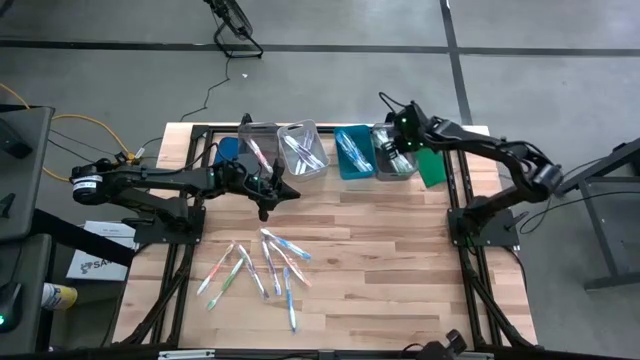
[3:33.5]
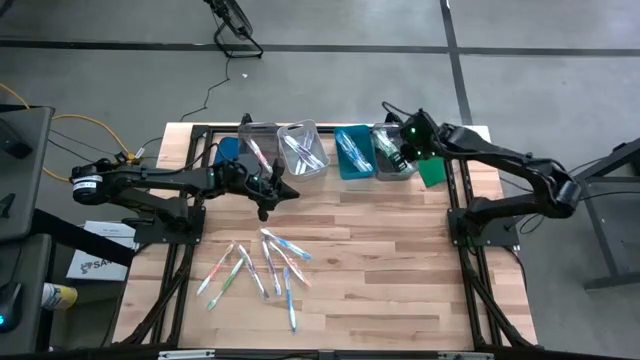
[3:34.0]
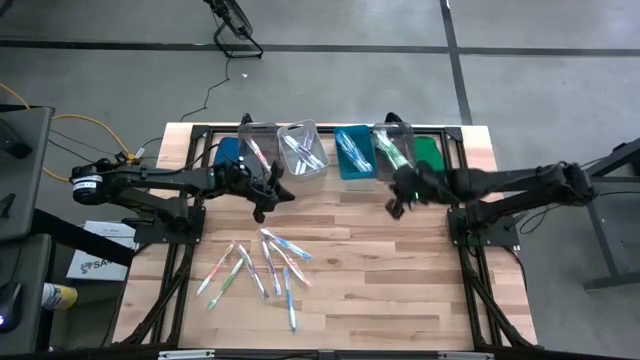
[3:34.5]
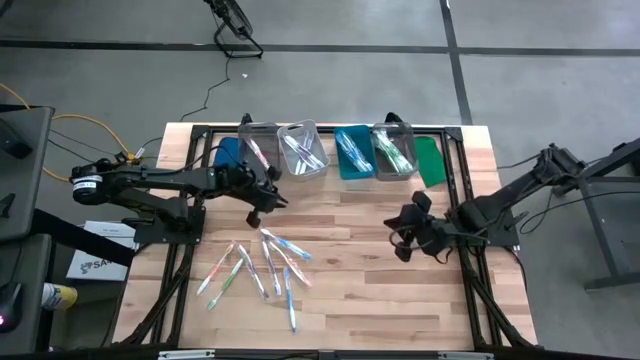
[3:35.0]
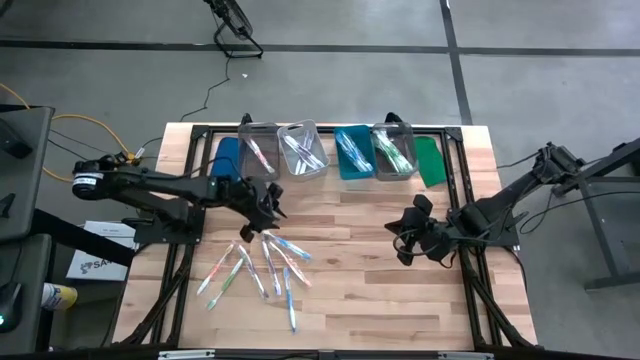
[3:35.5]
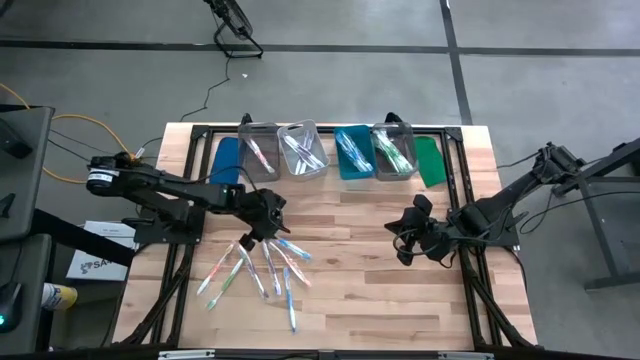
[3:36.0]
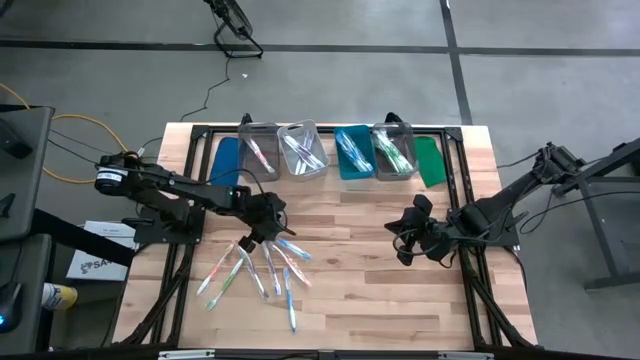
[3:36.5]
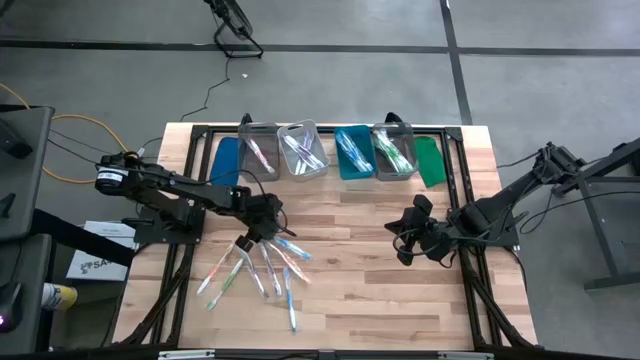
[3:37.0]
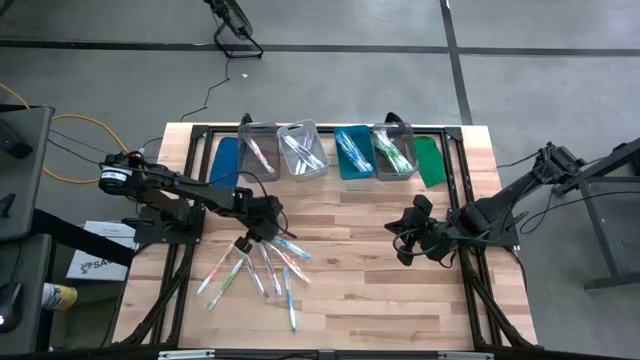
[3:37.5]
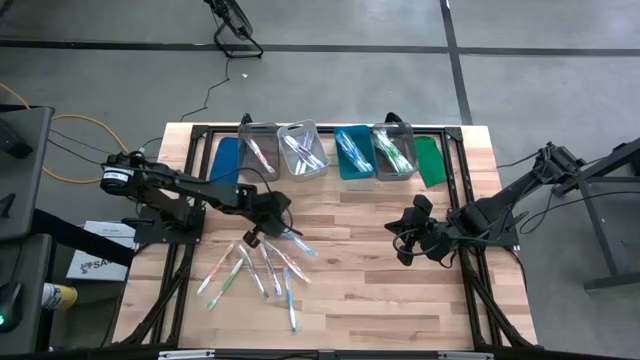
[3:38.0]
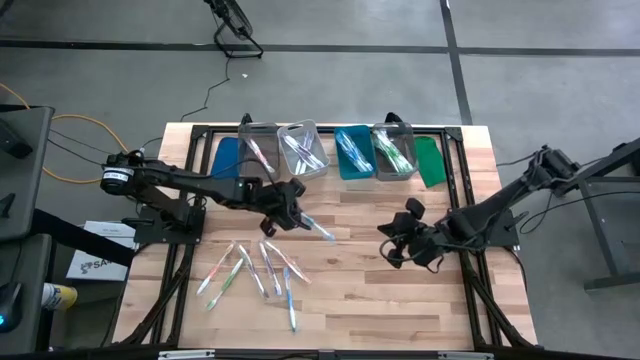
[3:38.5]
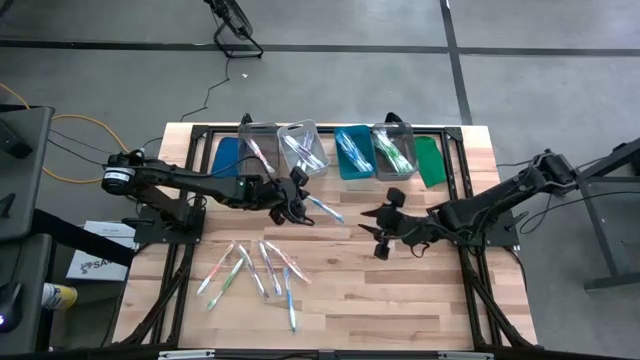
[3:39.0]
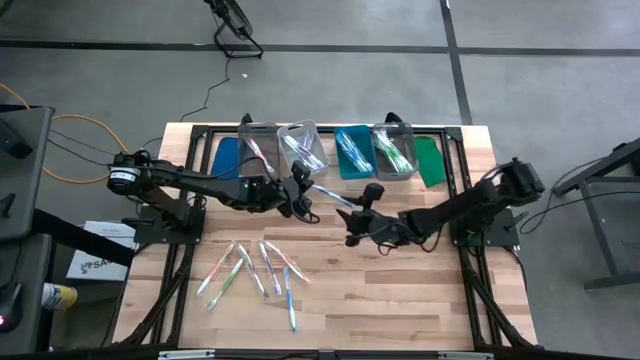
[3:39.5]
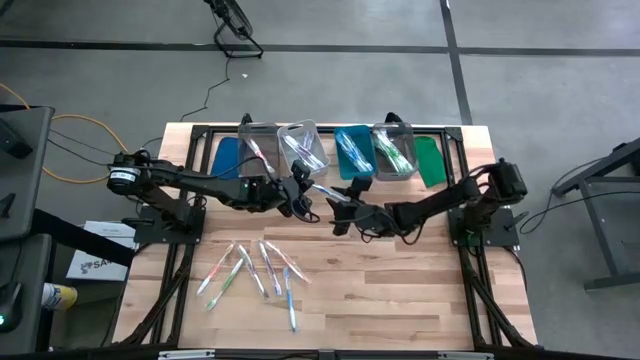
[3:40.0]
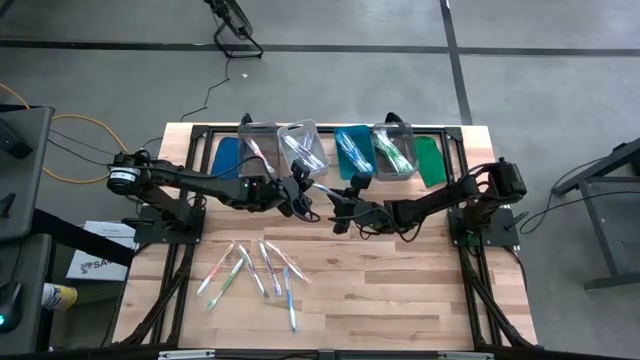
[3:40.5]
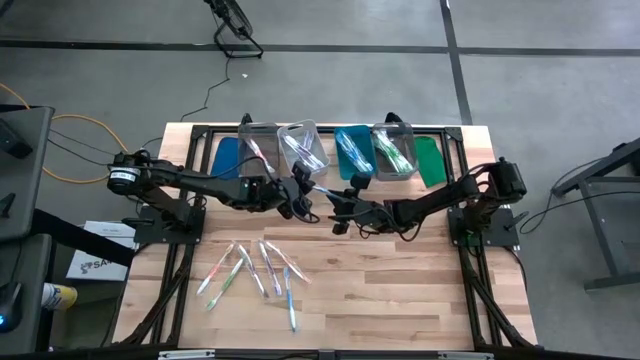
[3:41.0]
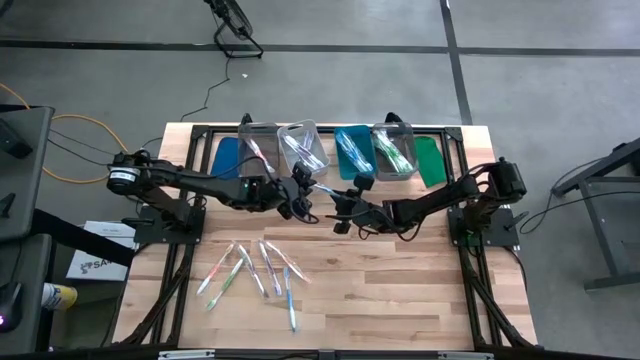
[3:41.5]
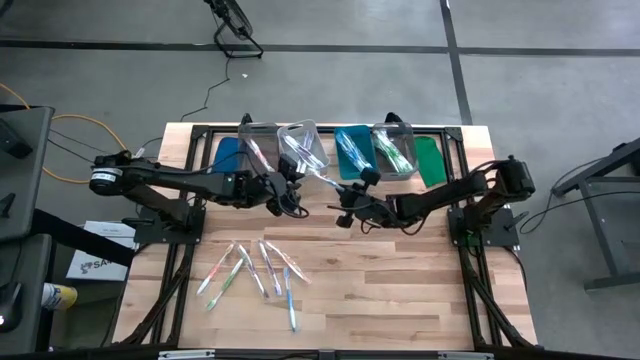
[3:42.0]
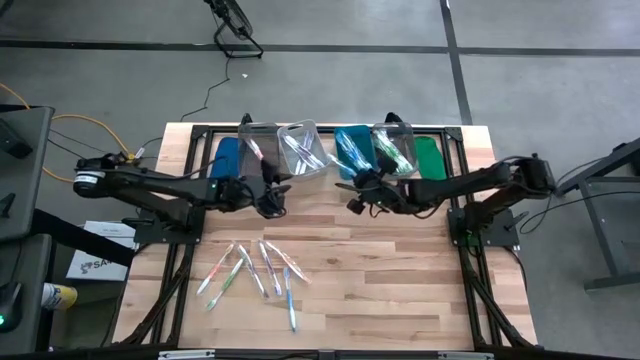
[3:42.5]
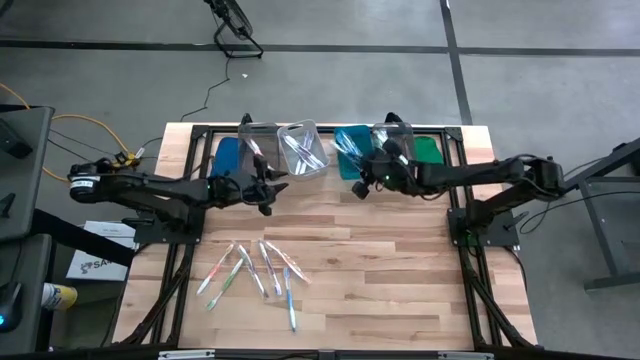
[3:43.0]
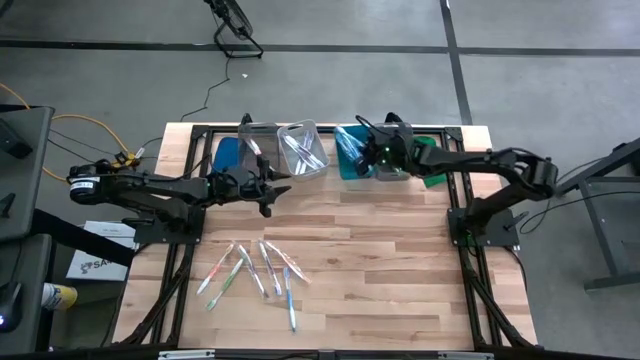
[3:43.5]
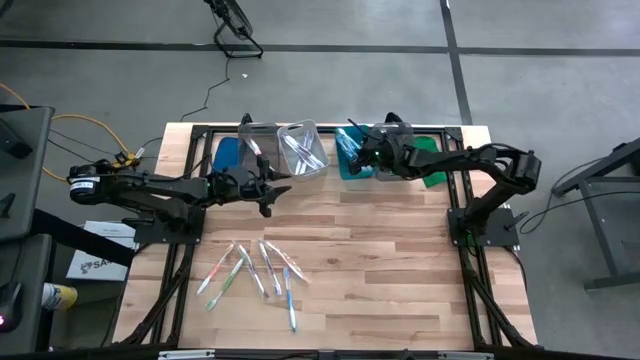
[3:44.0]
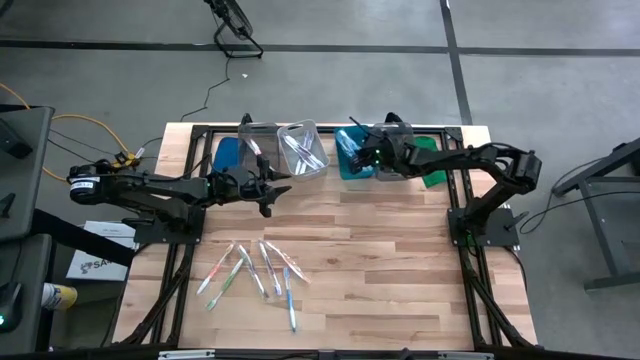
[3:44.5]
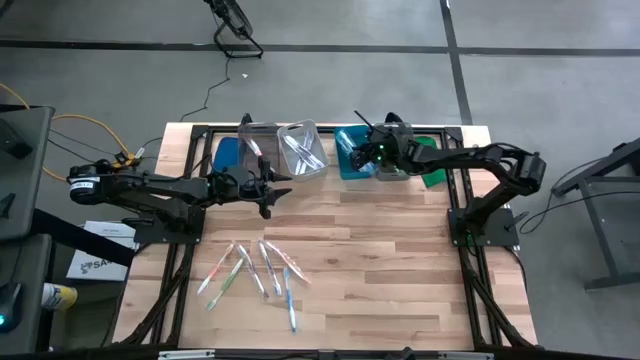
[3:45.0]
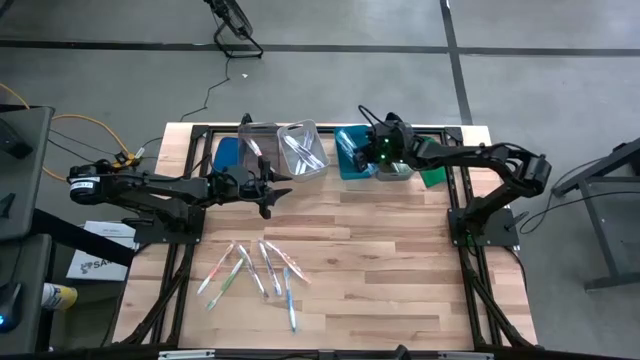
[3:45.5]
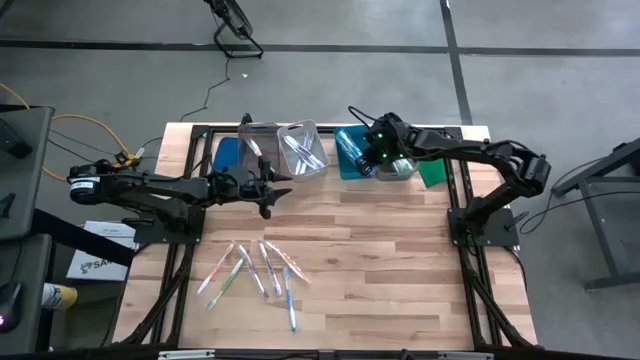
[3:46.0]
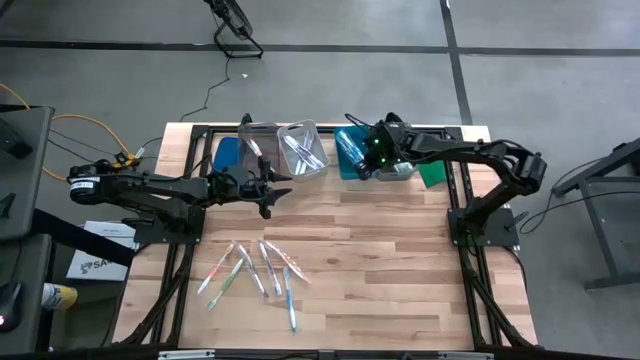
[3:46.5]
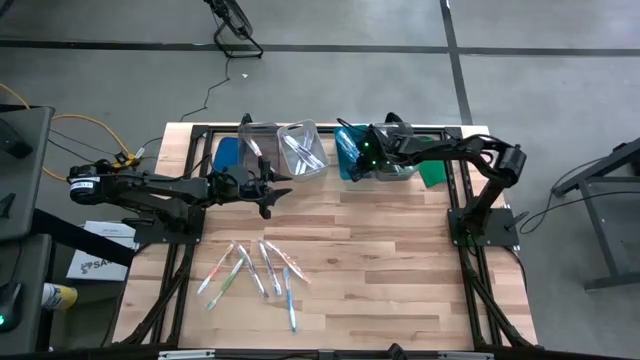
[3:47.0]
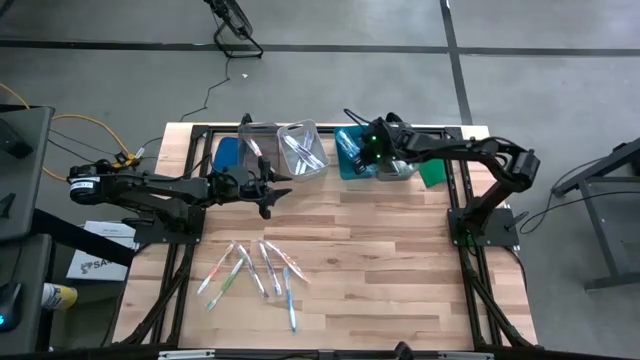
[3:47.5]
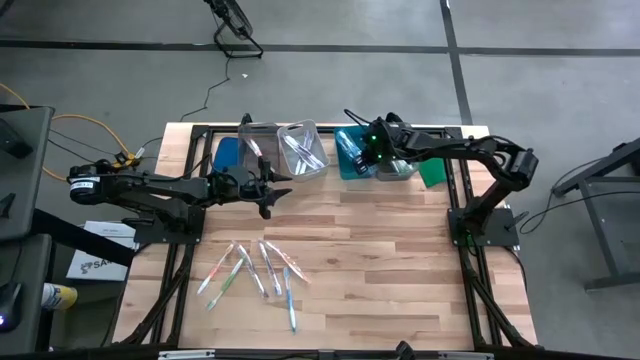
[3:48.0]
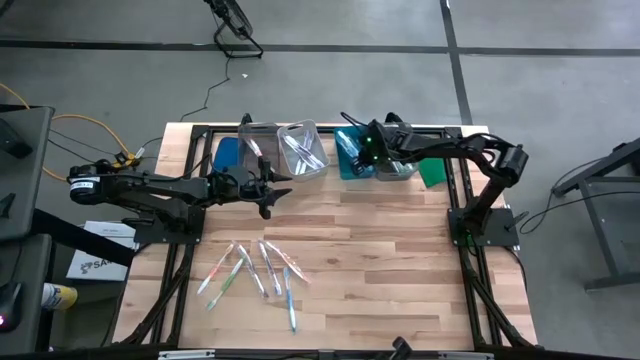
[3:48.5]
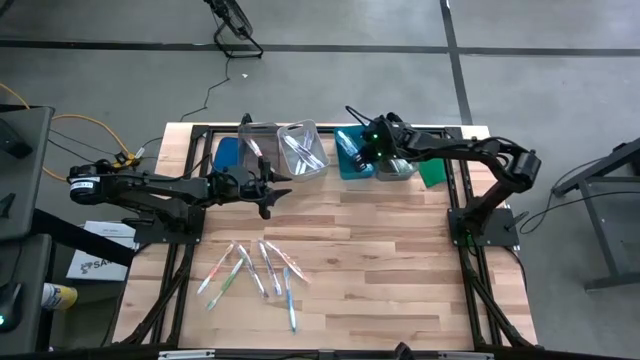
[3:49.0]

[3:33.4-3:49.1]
Task: Pick & Place Toothbrushes
Put the blue toothbrush into the blue bin

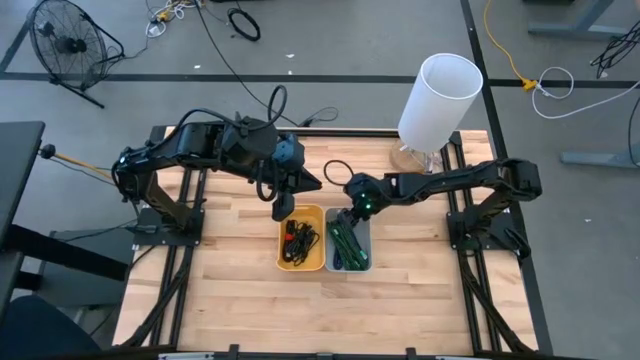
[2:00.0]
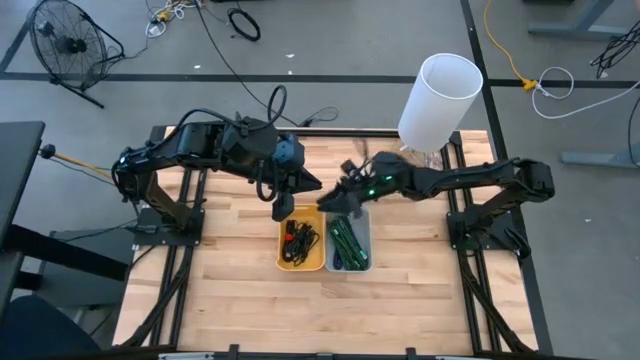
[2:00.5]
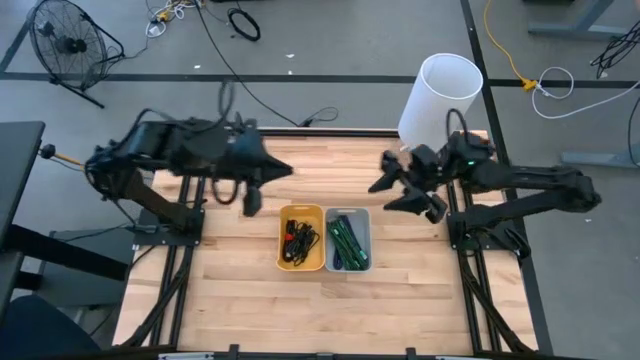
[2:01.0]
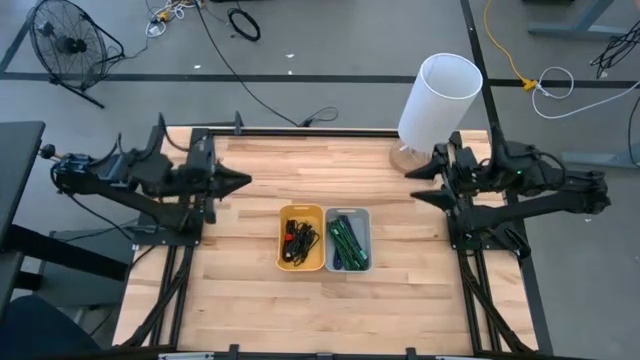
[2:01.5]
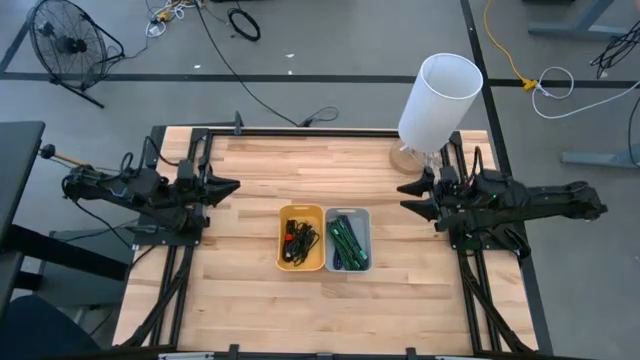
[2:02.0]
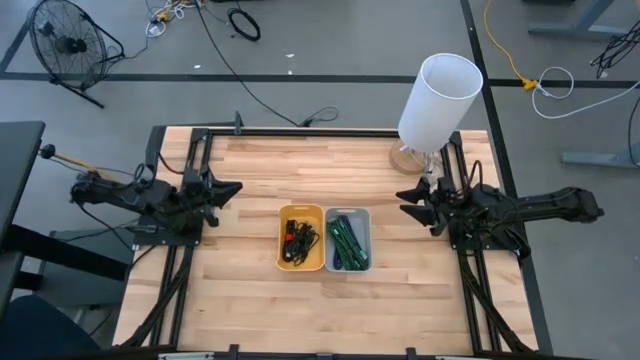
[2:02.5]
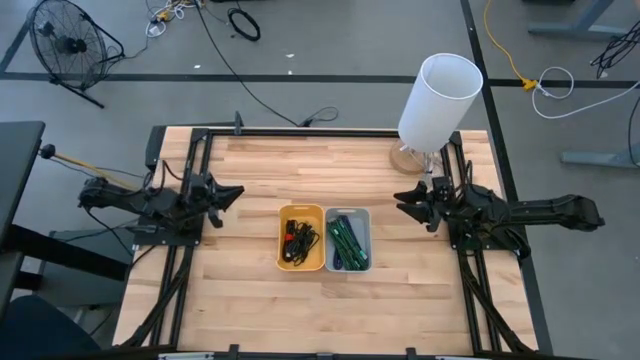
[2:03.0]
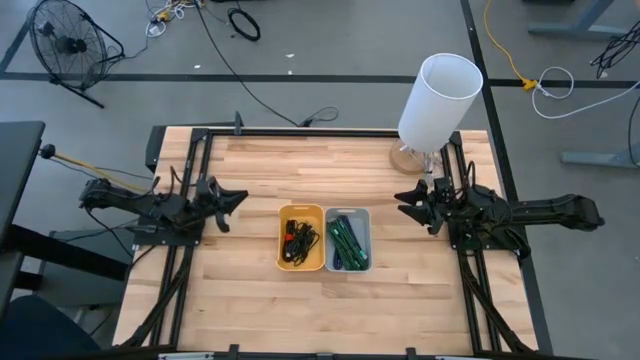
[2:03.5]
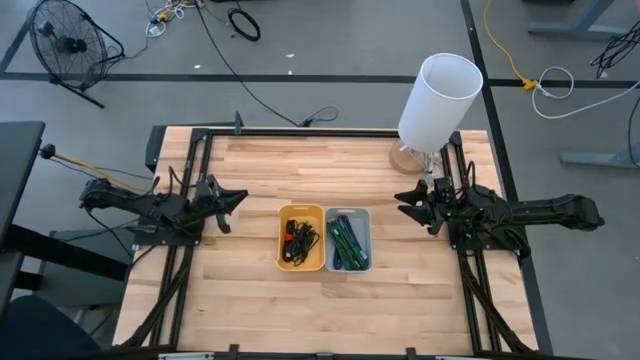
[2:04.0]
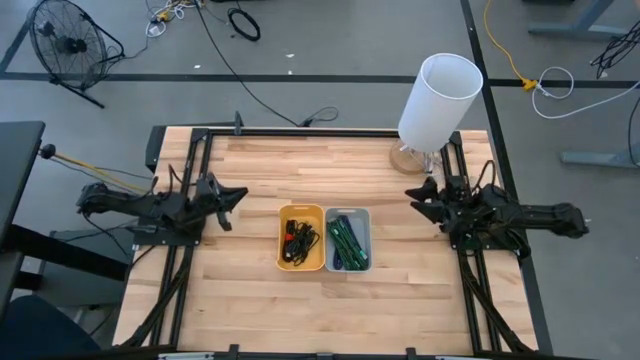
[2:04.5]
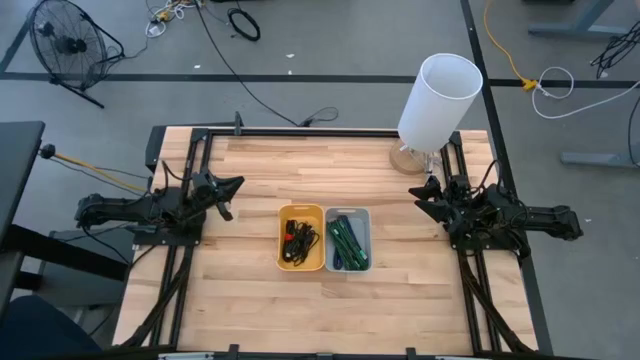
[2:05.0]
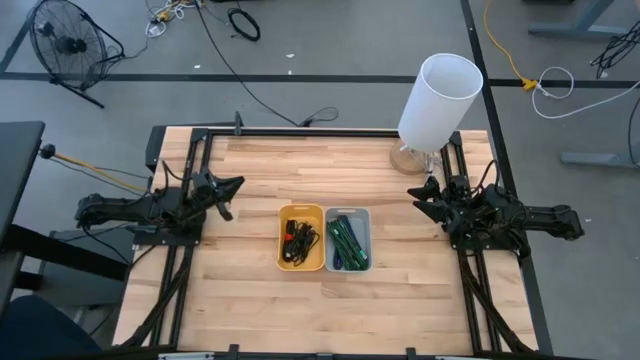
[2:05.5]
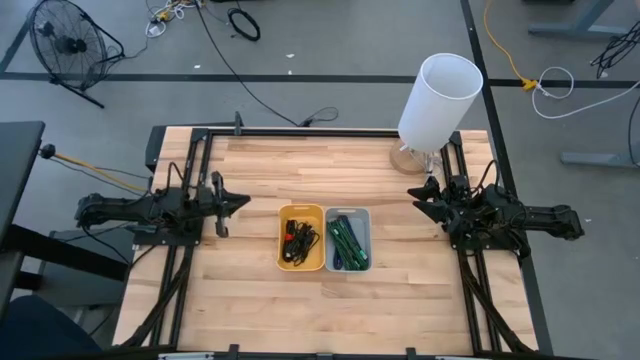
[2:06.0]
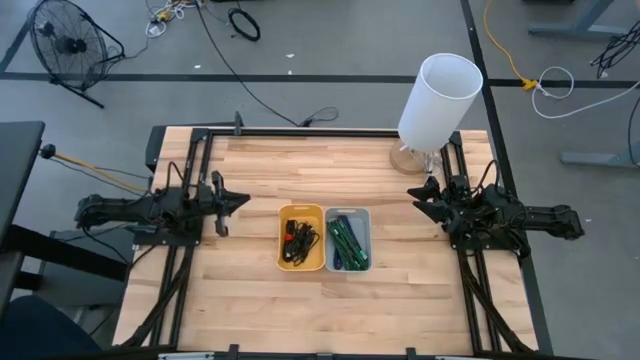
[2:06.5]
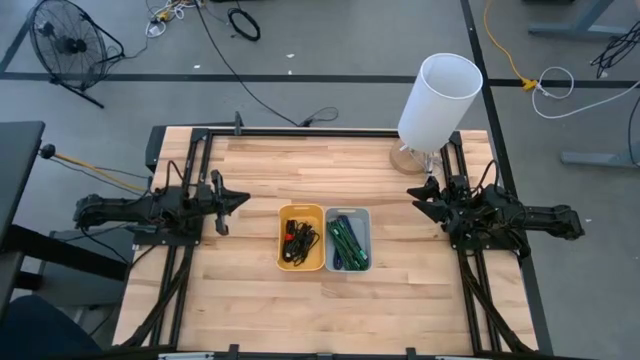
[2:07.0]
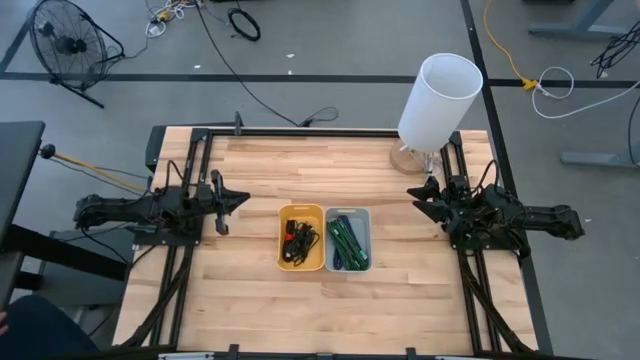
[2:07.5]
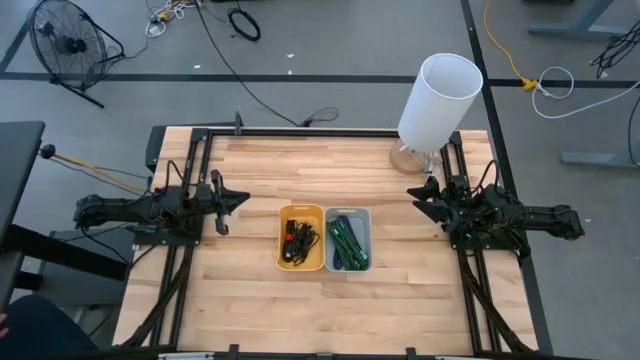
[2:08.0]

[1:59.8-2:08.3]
Task: Pick & Place USB Port
Return to Home Position
